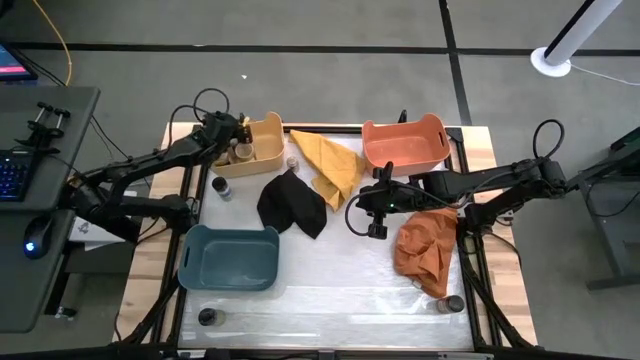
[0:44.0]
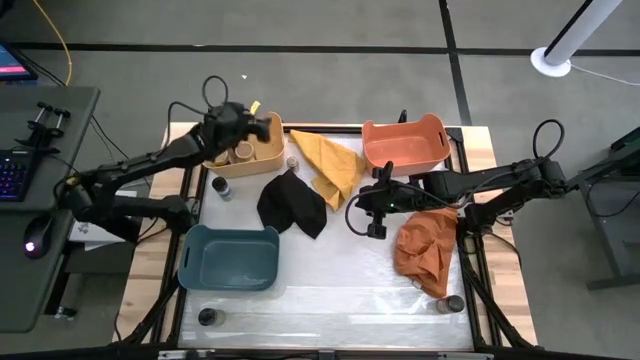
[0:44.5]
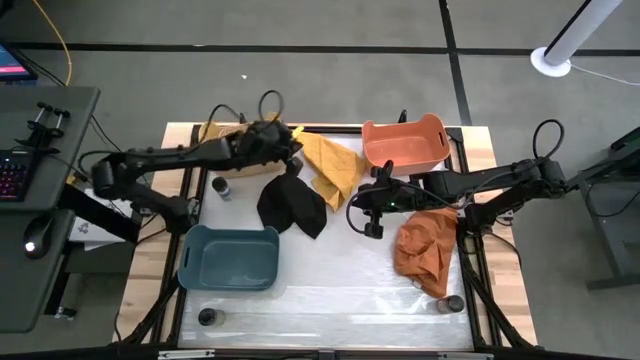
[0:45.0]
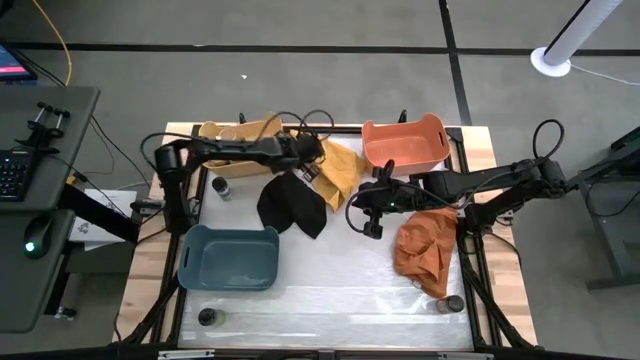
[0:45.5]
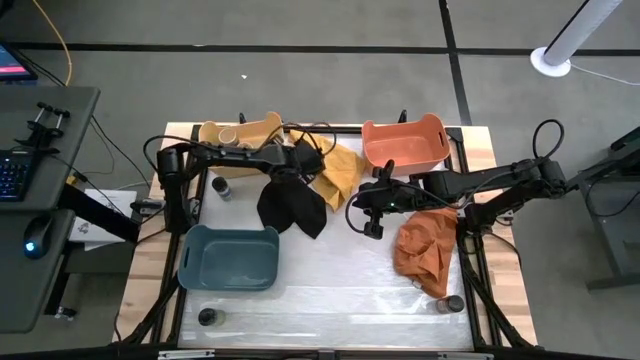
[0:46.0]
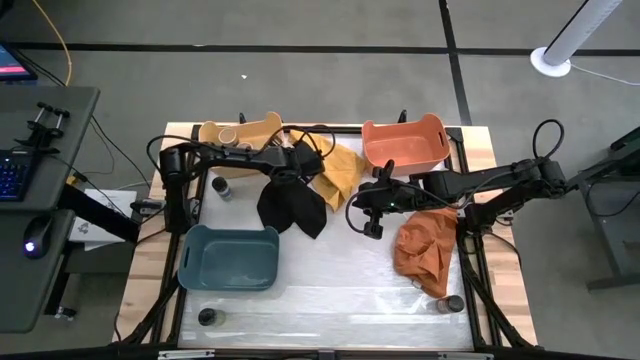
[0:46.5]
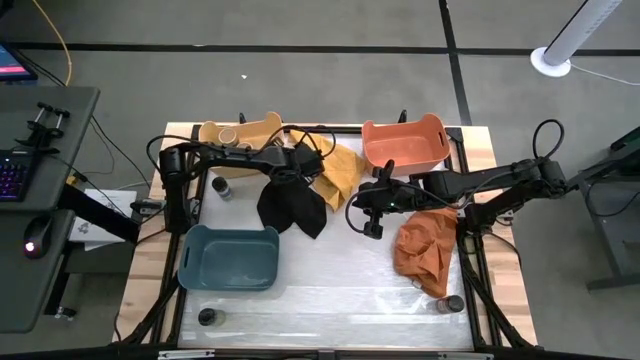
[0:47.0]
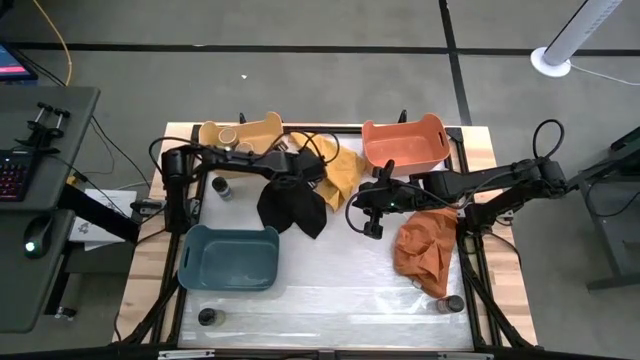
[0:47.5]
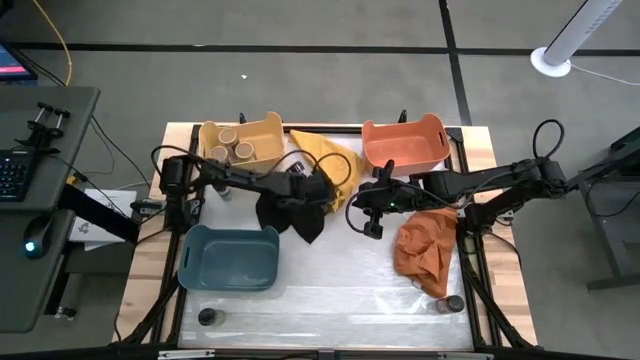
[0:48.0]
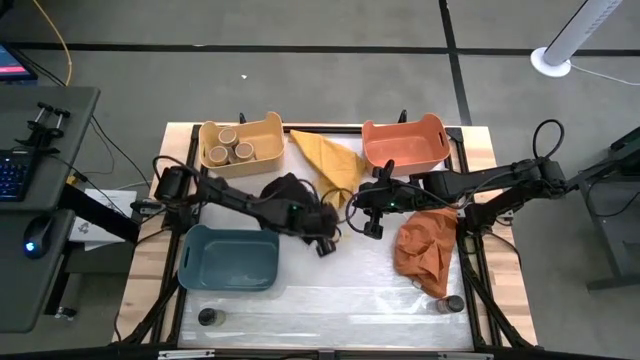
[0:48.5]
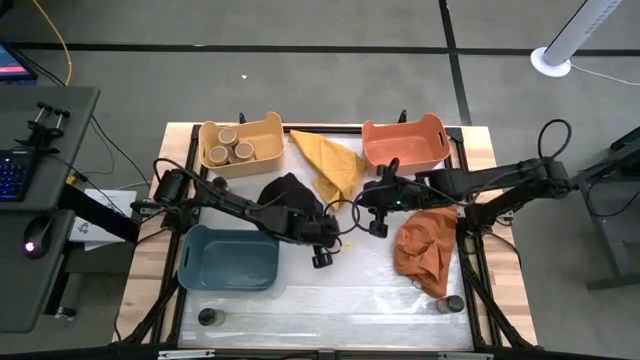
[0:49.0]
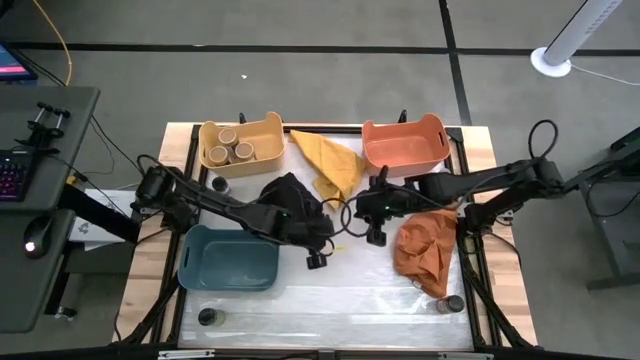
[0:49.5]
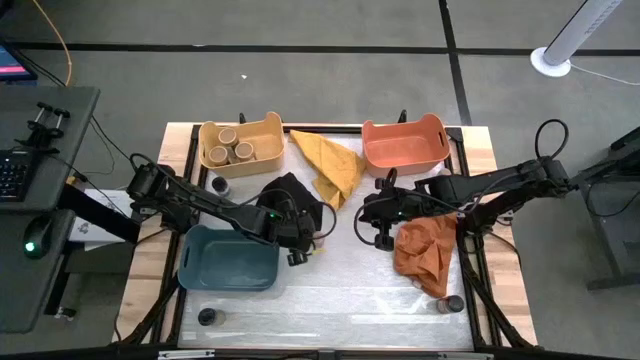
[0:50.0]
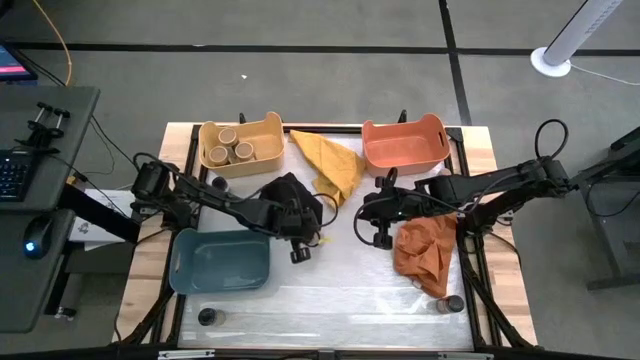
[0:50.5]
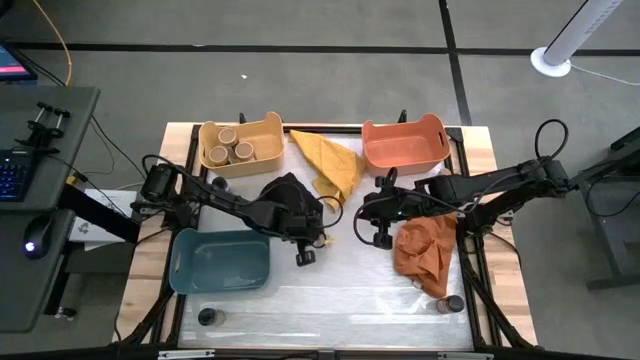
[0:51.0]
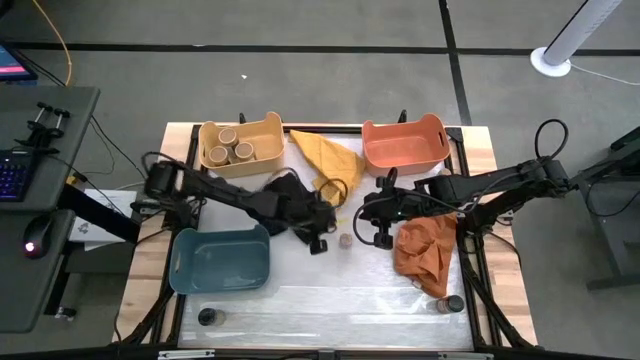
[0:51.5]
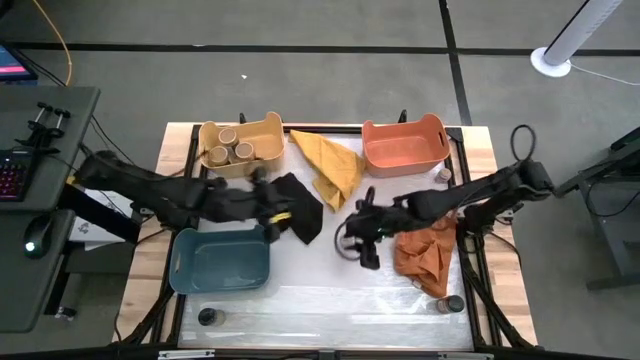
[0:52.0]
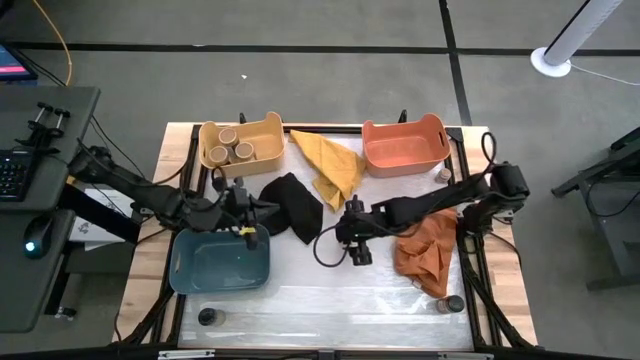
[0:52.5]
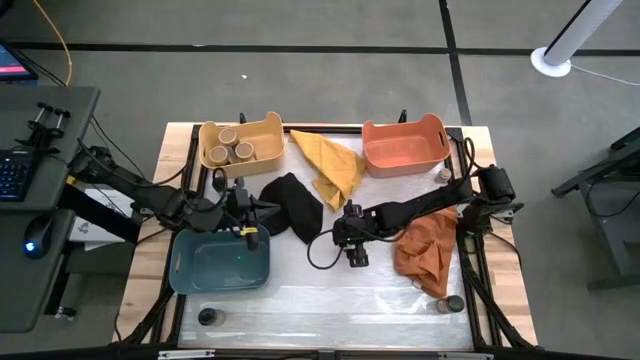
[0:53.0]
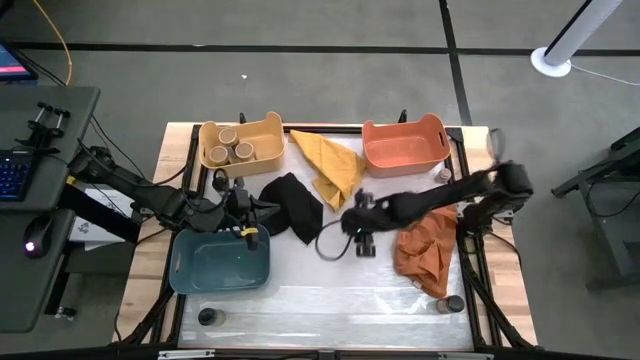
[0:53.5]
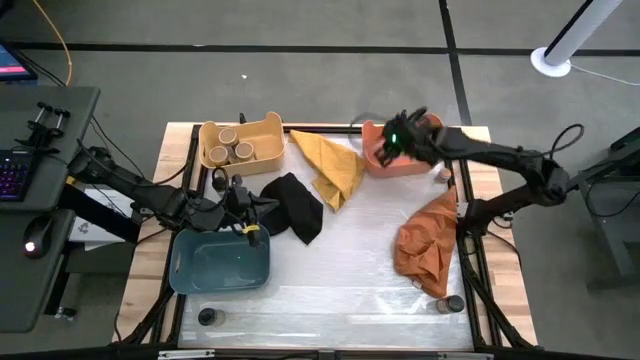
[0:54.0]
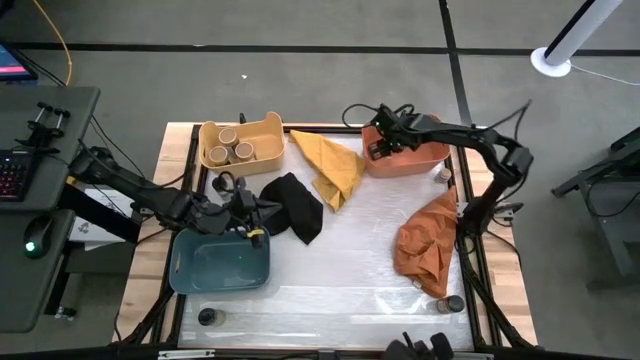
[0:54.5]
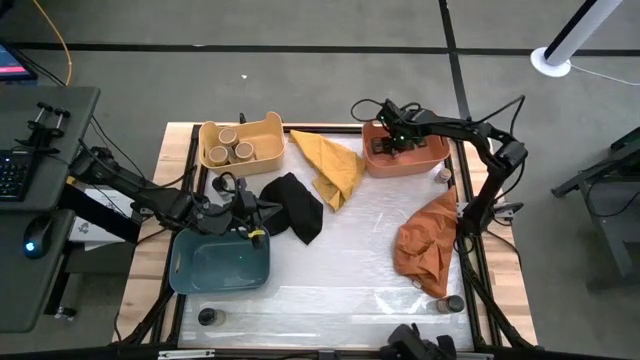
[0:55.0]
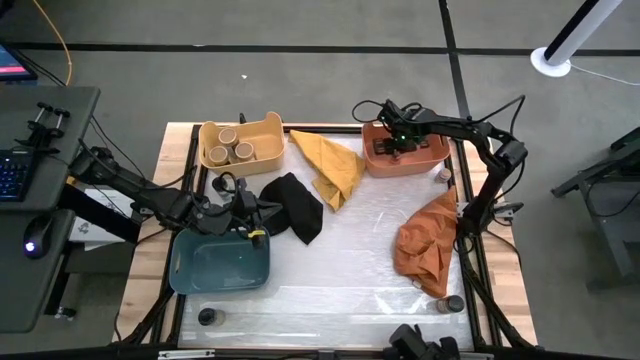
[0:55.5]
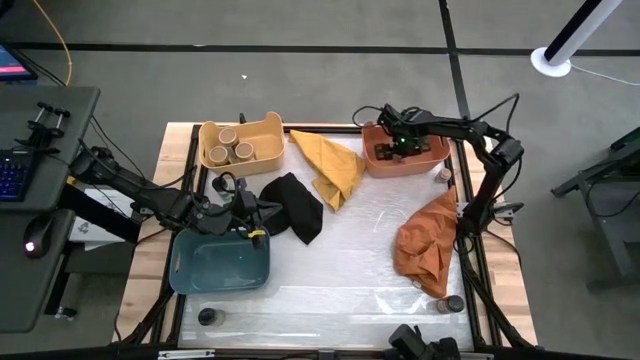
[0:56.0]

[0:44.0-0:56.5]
Task: Sort spices by type
Put the left brown spice bottle into the orange bin

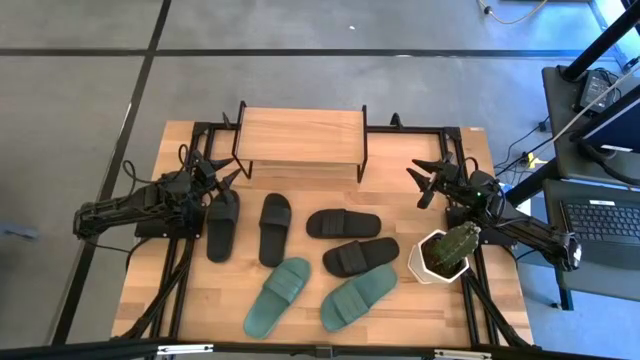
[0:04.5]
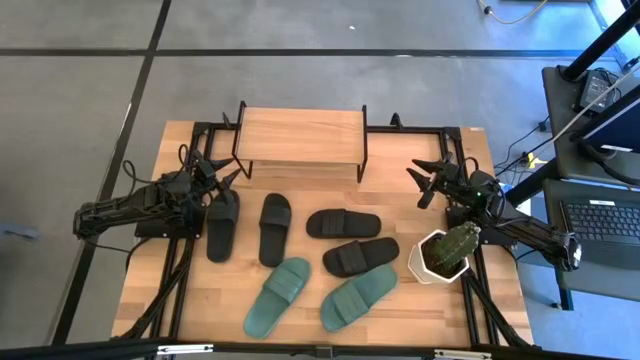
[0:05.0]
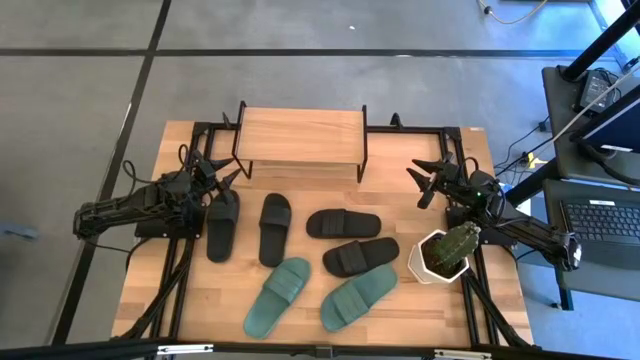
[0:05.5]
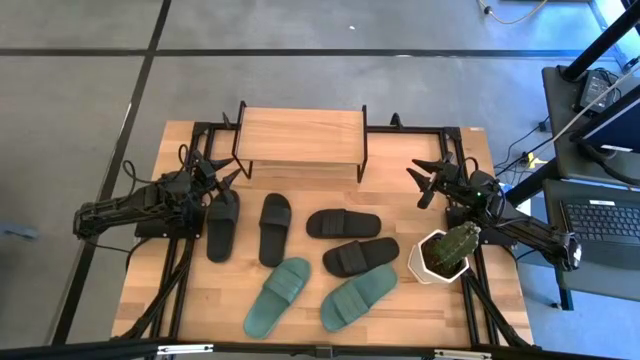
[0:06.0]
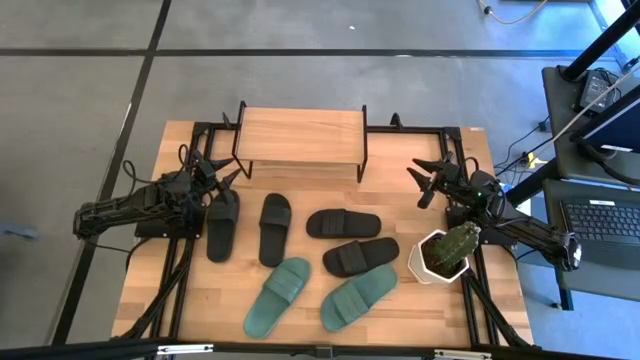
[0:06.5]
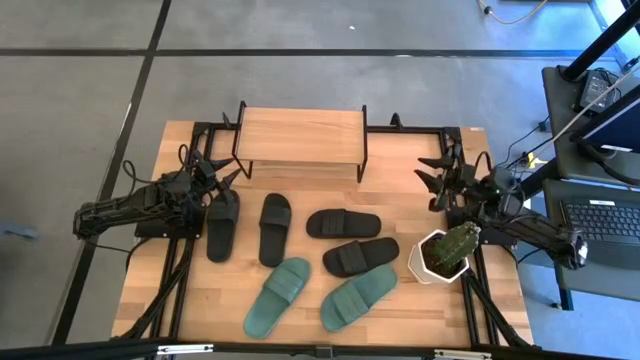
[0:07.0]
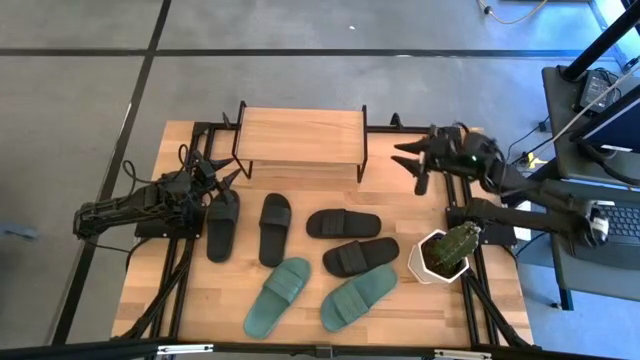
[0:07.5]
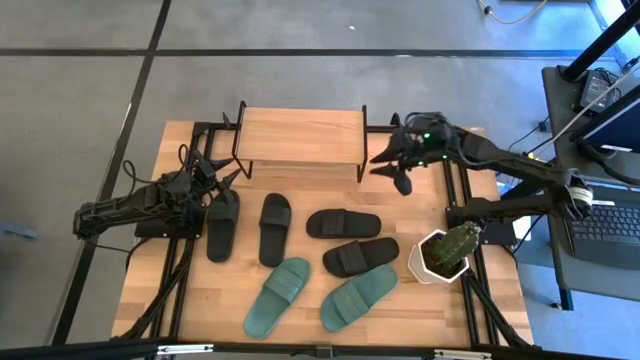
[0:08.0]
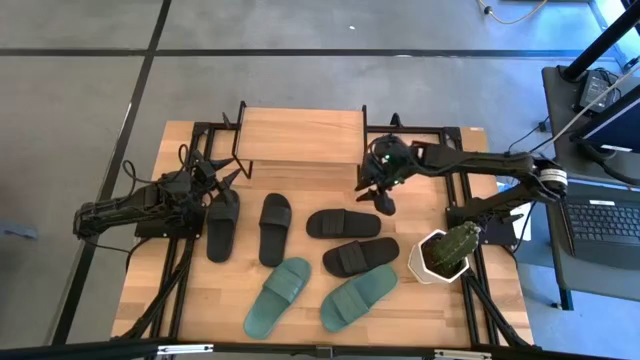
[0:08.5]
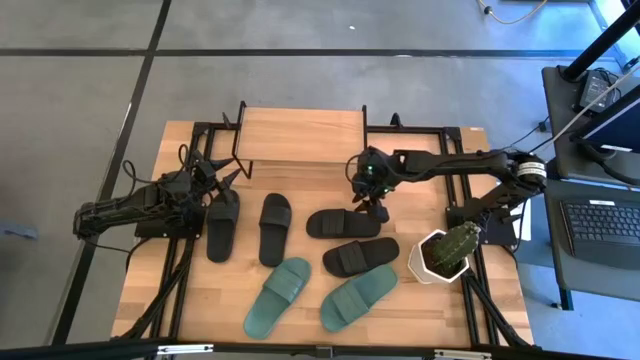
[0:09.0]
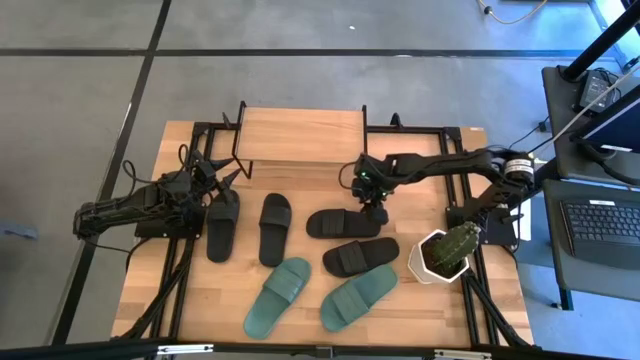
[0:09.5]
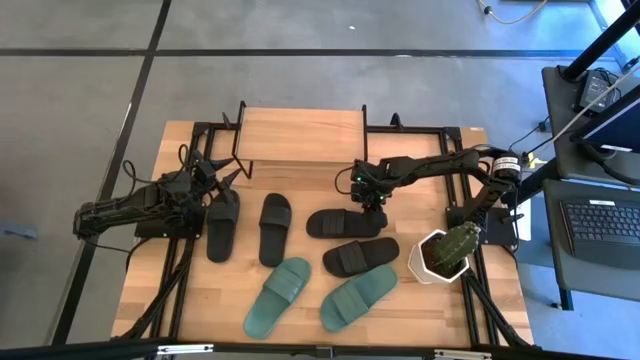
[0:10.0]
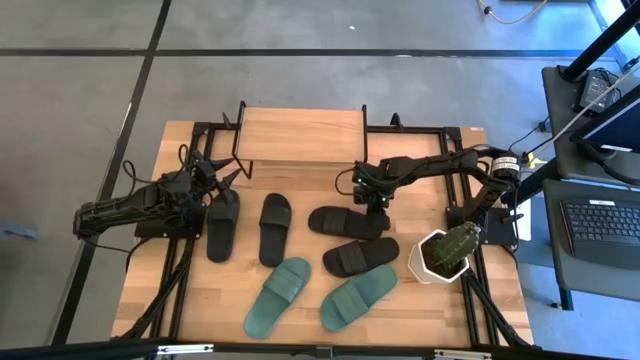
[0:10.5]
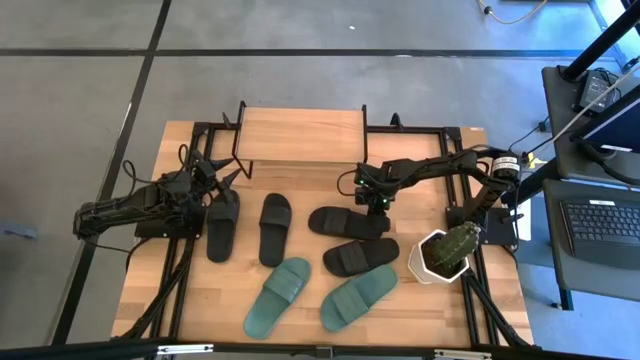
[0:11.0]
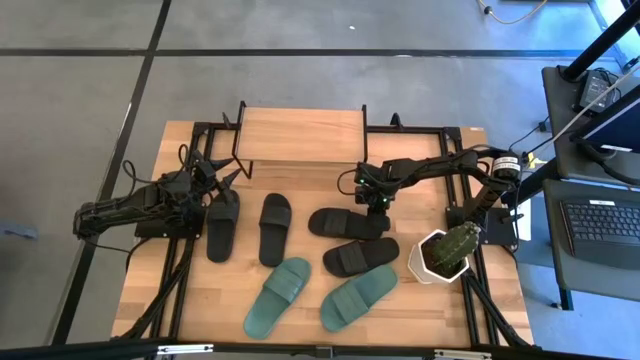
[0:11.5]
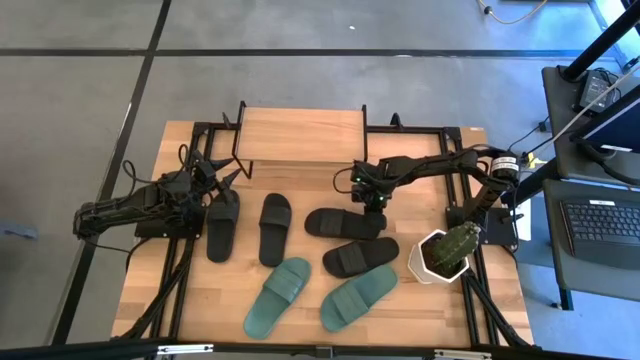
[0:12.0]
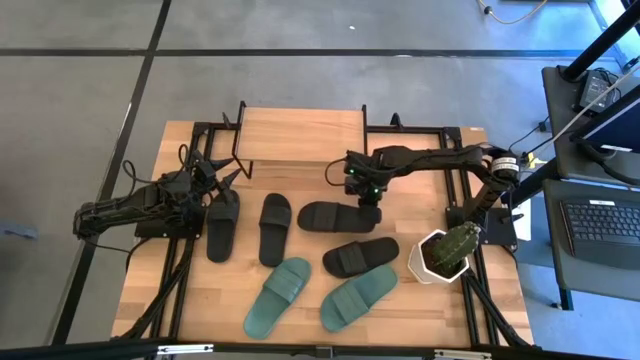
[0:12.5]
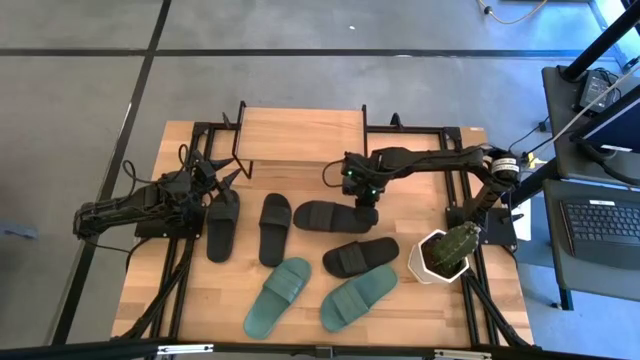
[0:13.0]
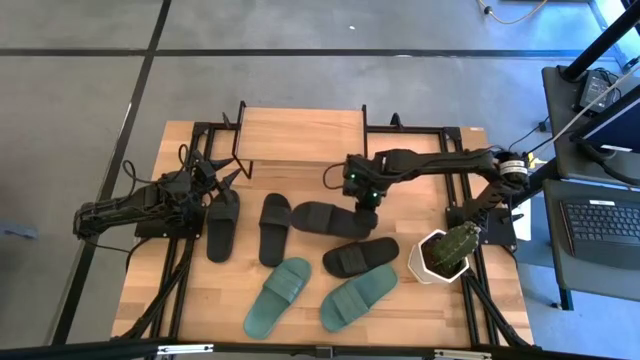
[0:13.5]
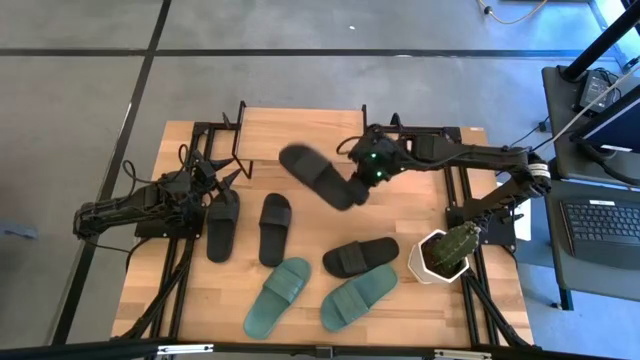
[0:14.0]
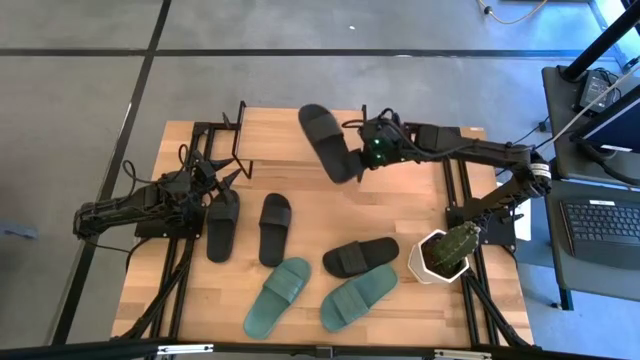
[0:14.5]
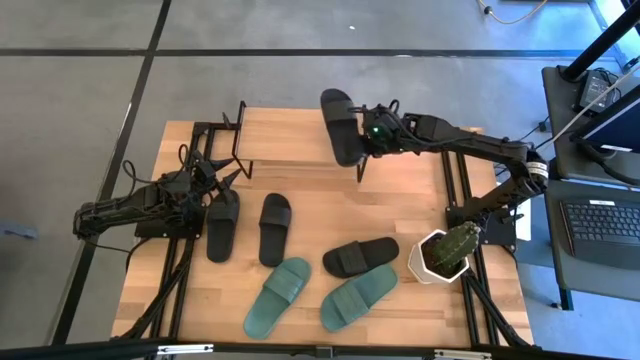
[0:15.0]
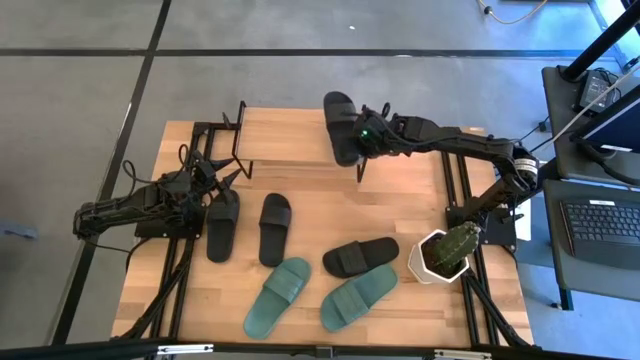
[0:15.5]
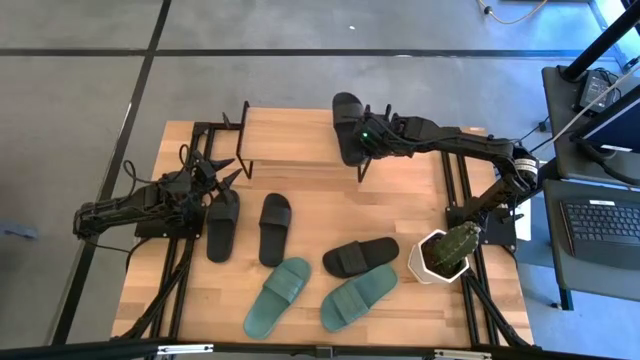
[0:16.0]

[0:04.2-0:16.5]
Task: Pick and place slides into the shelf
Put the black slide on the shelf
